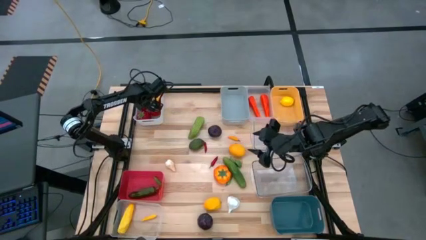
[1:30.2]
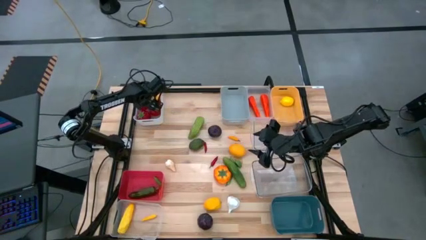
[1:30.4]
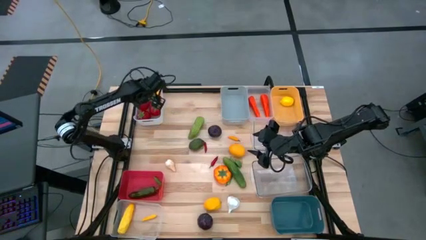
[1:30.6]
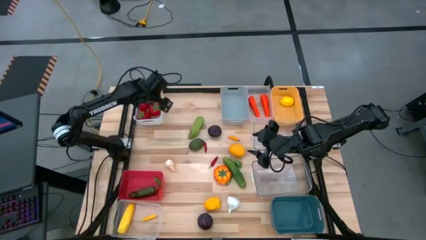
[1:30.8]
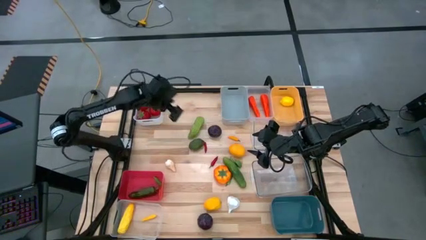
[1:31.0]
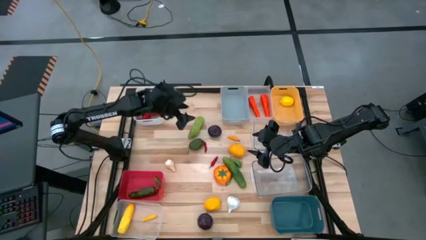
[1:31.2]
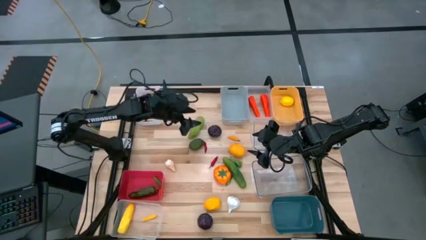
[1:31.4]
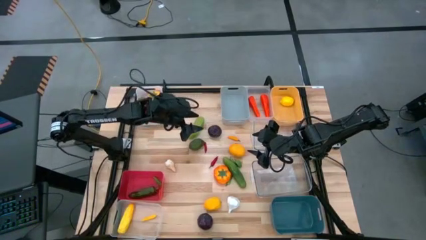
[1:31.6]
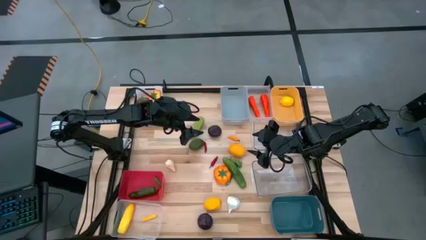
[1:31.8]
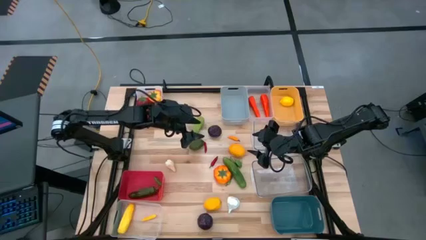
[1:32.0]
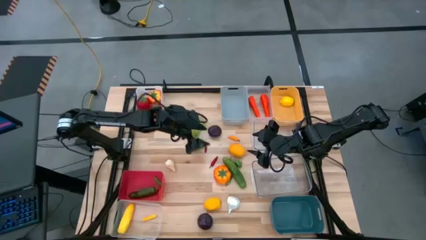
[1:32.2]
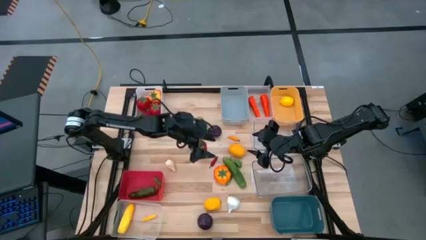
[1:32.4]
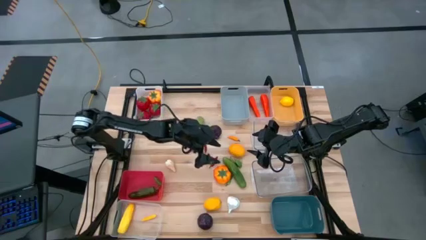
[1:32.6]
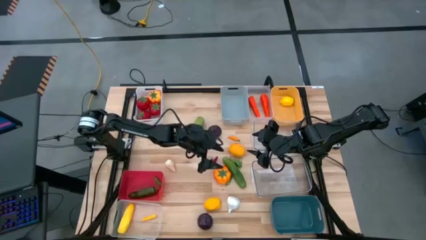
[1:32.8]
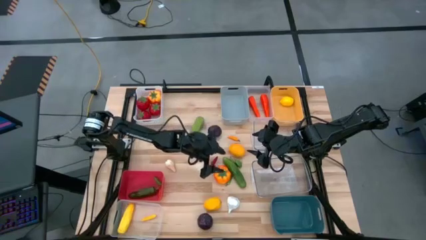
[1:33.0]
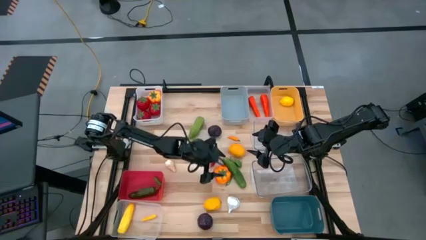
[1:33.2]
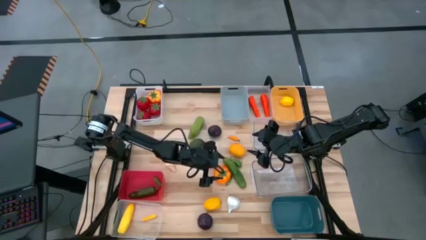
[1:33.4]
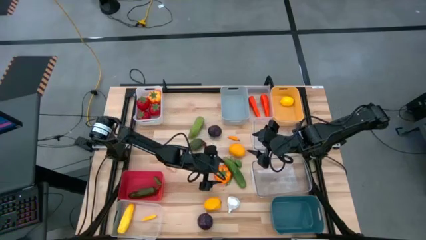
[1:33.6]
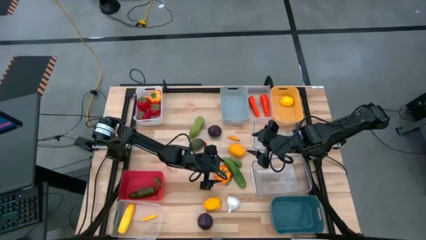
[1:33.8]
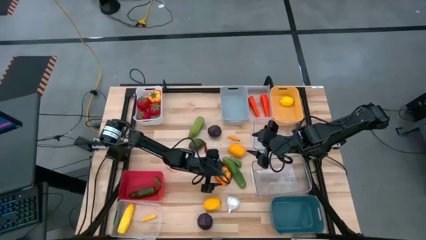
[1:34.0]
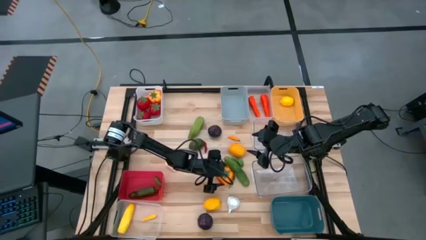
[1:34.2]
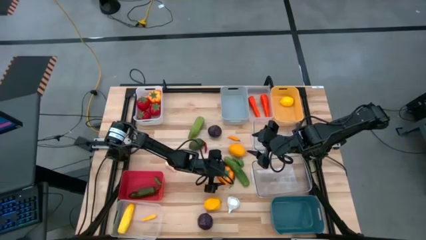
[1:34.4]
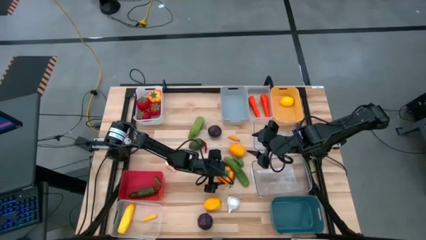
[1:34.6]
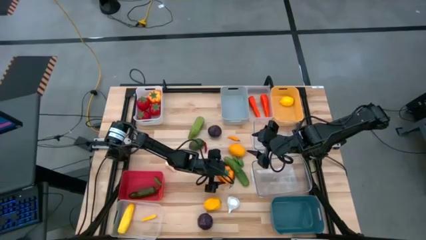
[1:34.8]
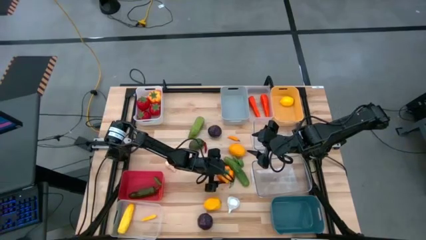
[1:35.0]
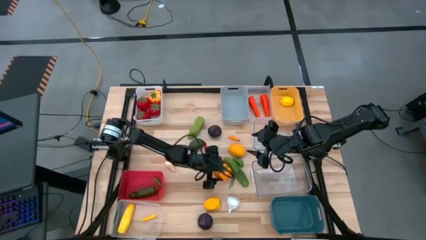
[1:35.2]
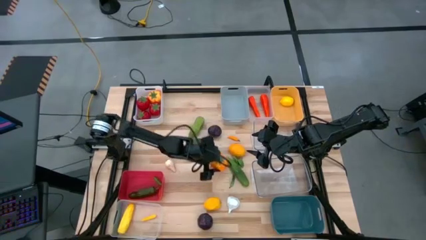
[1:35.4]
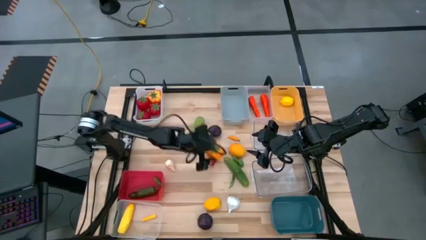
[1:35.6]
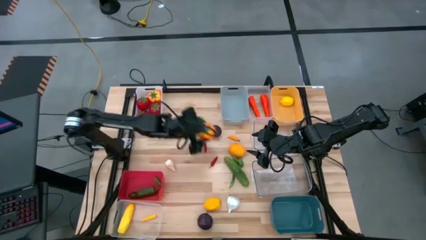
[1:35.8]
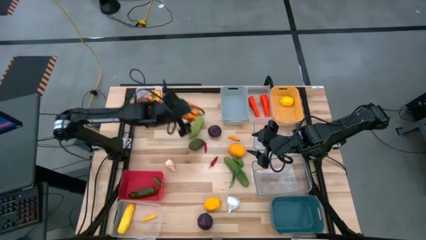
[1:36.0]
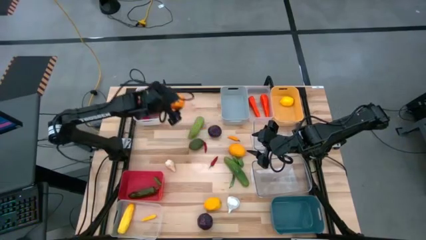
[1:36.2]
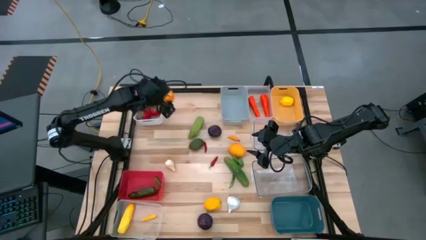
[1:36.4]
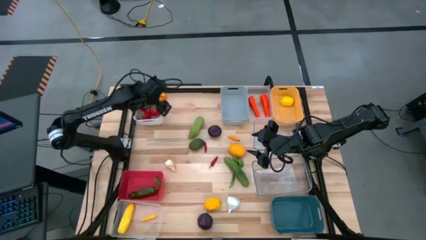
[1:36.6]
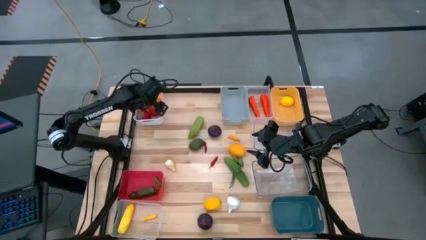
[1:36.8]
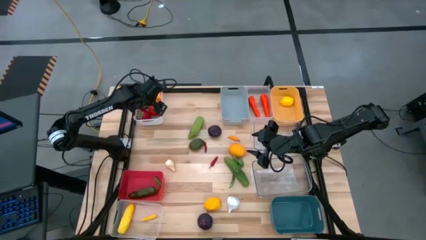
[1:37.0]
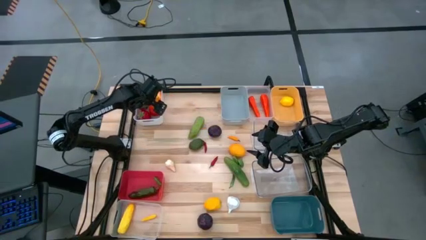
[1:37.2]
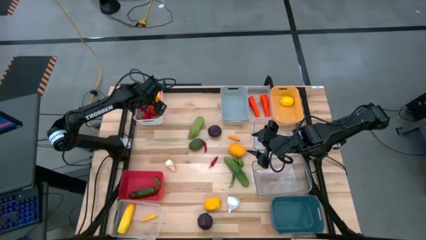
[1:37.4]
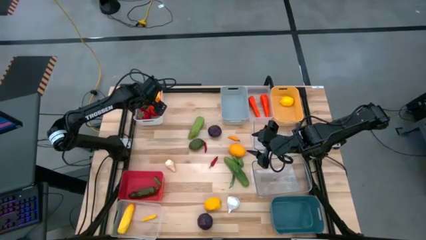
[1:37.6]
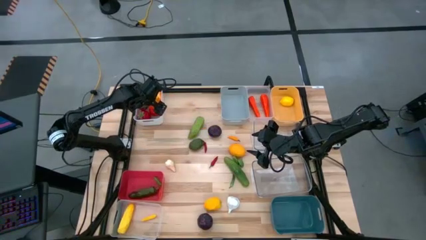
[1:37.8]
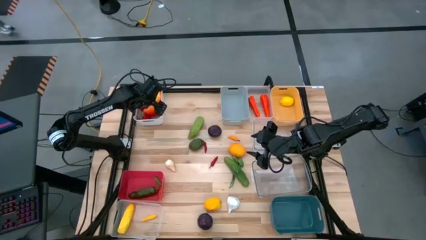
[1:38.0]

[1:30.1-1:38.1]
Task: Sort produce into baskets
Put the pumpkin into the white bin

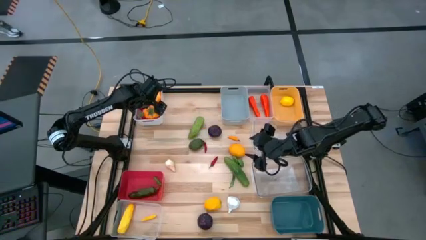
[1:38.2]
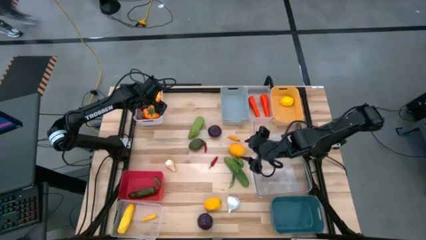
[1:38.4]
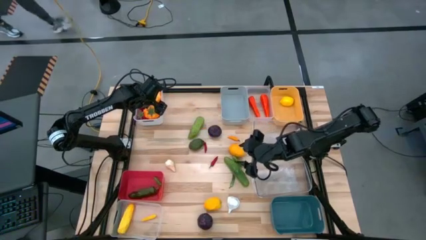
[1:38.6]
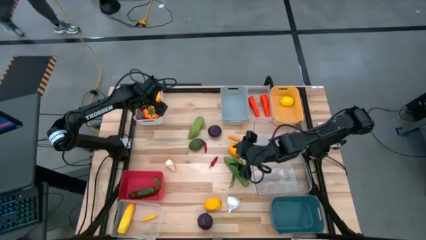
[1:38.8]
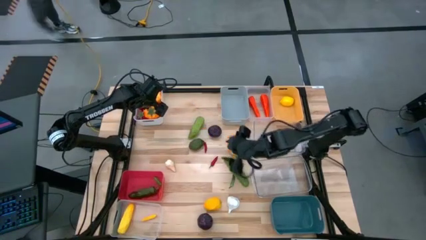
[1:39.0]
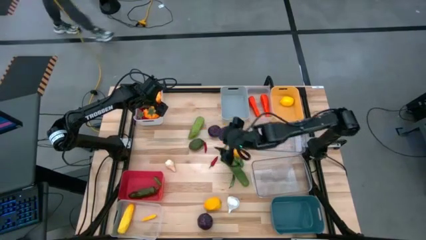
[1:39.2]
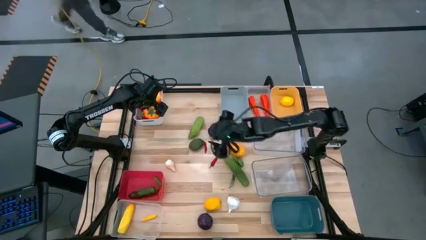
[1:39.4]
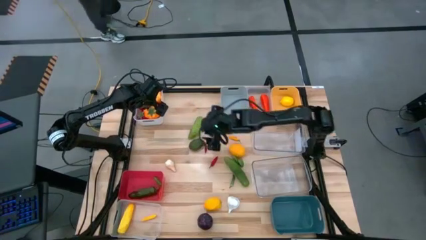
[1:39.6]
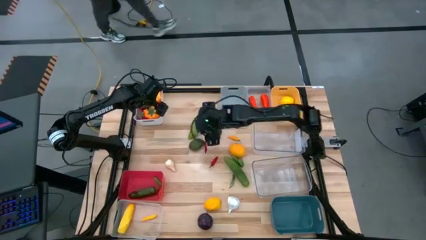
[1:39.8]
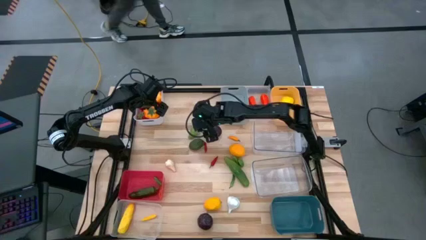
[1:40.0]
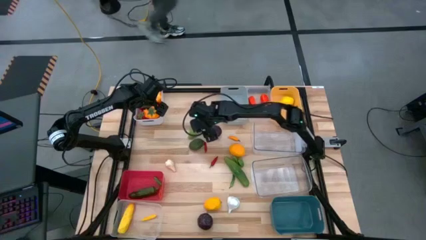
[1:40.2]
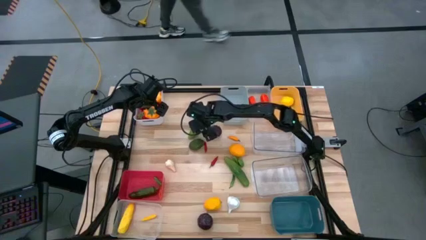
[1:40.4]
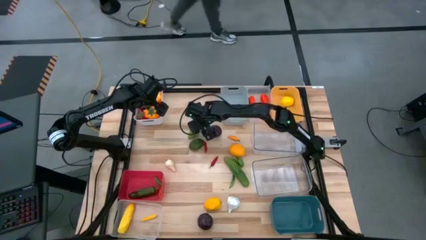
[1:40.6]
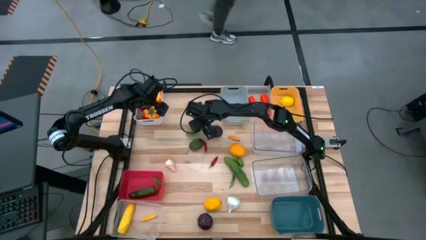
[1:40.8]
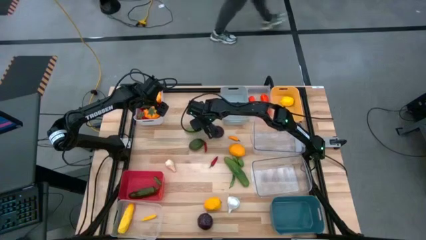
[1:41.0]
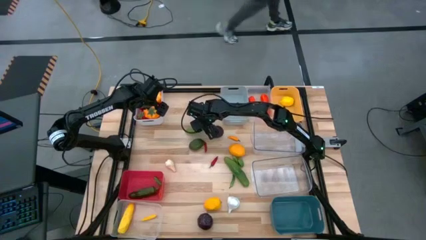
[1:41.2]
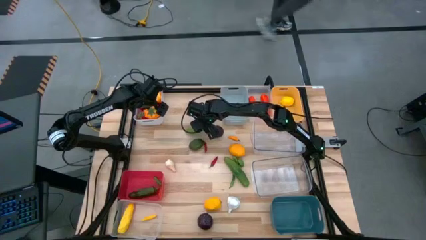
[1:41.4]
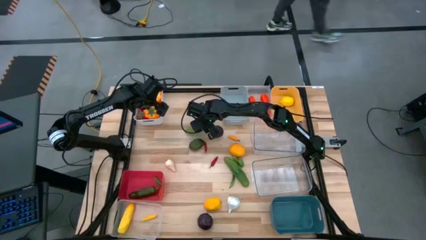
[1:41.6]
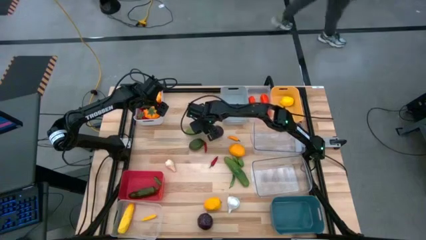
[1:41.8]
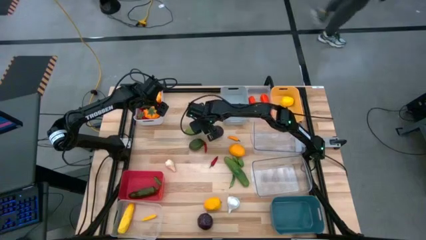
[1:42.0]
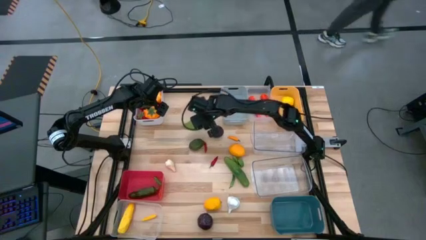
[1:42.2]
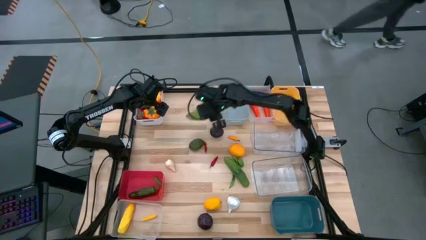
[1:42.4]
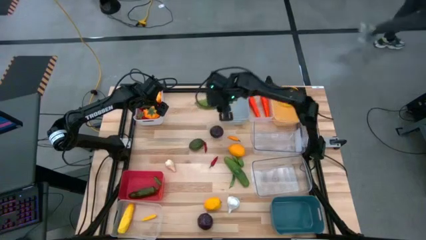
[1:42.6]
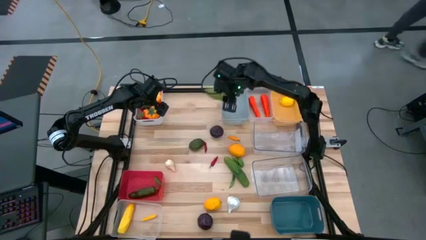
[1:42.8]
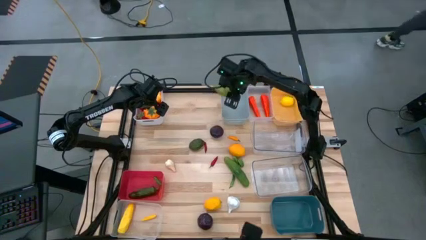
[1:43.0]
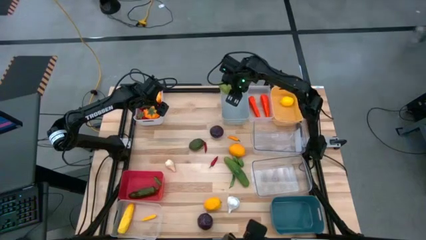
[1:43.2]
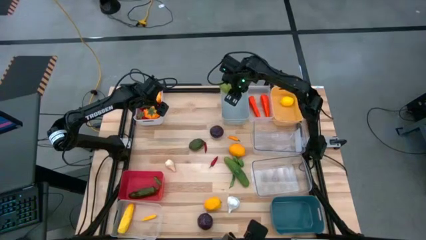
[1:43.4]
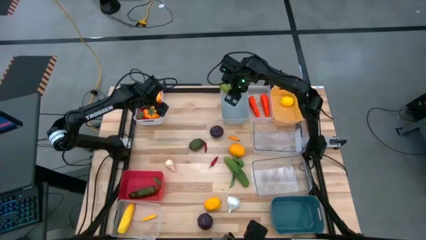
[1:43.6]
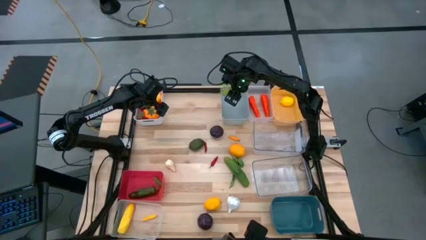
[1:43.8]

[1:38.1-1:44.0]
Put the top cucumber into the gray bin

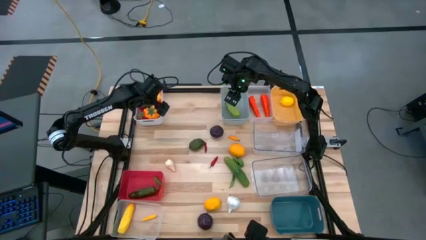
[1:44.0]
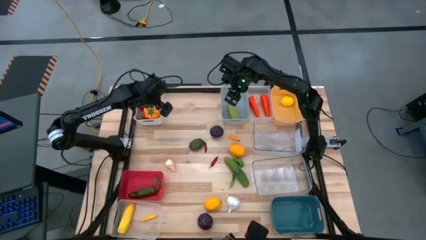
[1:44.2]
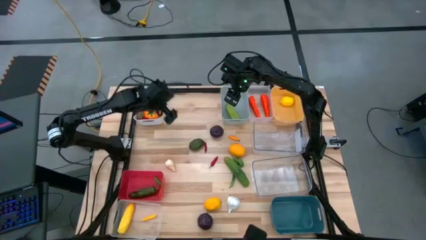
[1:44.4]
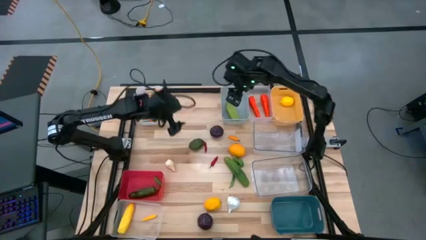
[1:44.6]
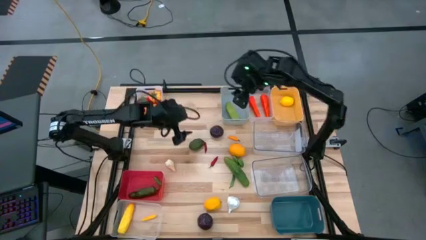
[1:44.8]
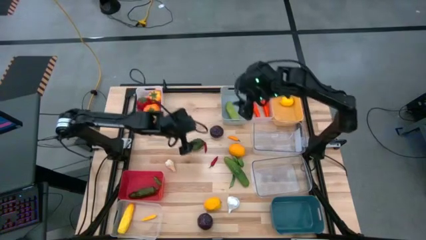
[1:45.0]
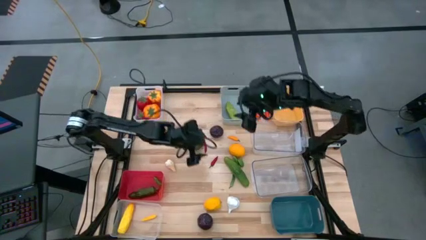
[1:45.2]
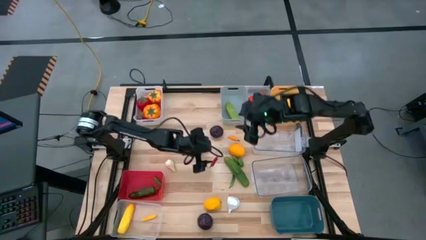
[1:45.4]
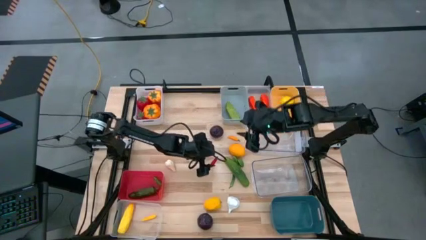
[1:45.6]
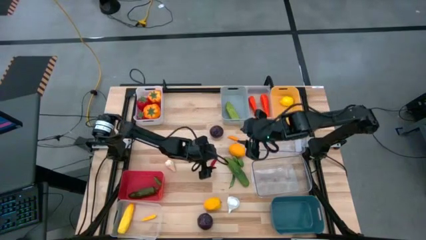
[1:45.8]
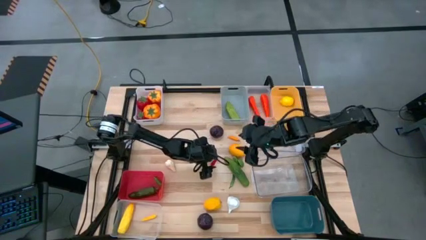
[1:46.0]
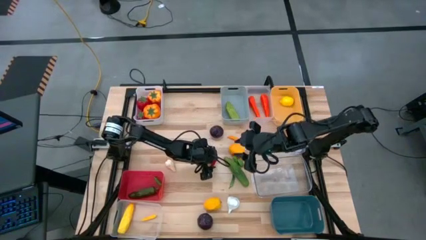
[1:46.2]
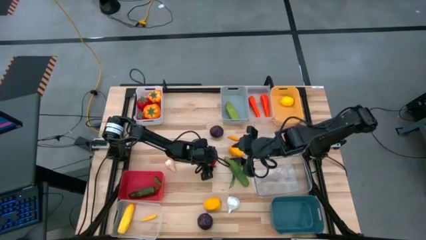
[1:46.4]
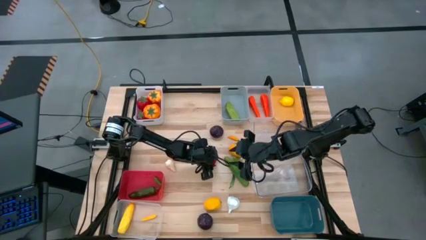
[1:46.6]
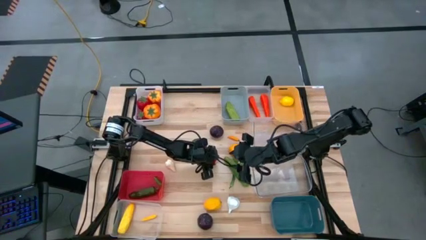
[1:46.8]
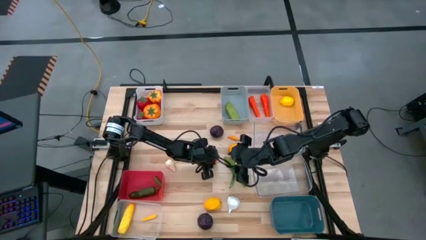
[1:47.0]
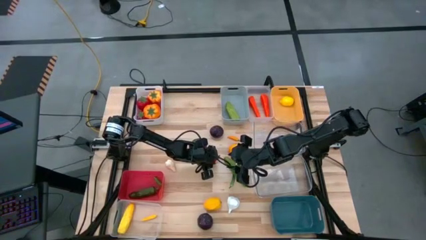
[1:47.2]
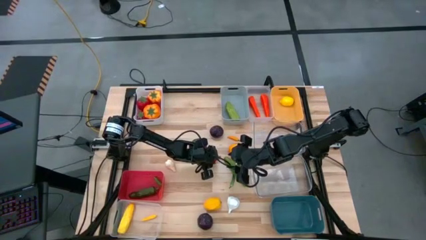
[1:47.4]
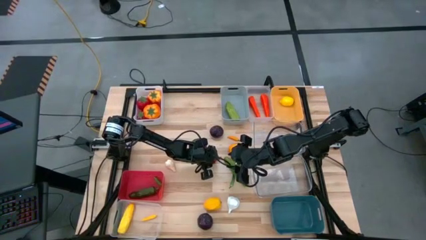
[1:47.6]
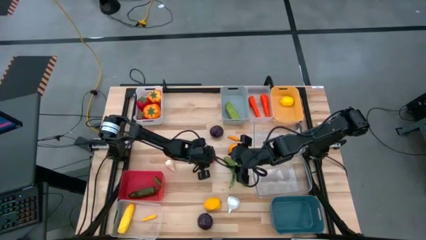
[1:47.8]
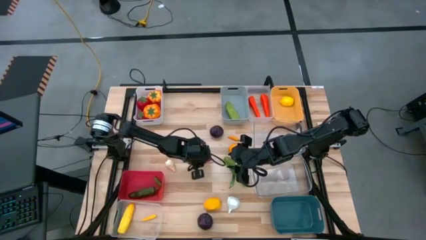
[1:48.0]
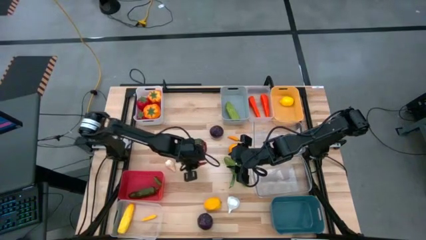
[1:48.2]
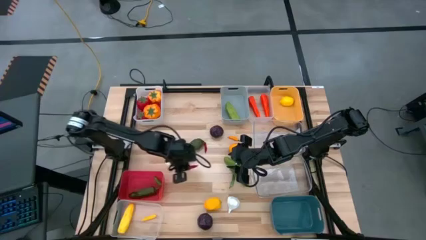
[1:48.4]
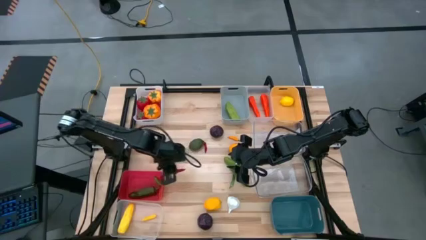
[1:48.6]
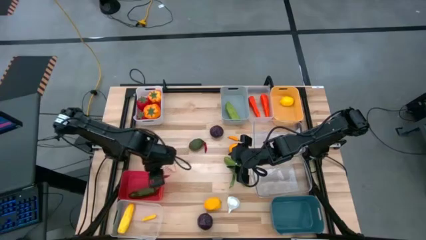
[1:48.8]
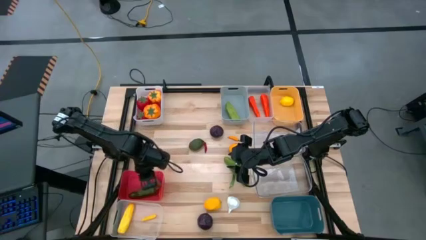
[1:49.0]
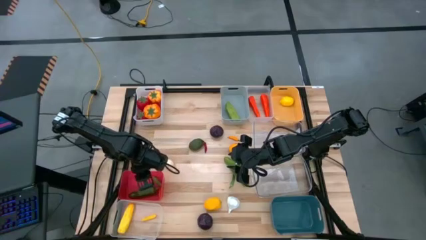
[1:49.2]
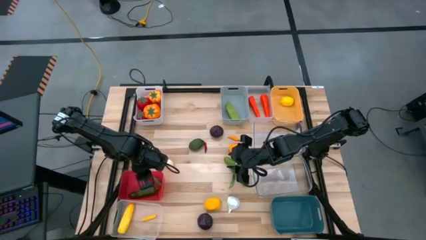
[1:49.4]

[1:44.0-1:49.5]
Put the bottom red pepper into the red bin
